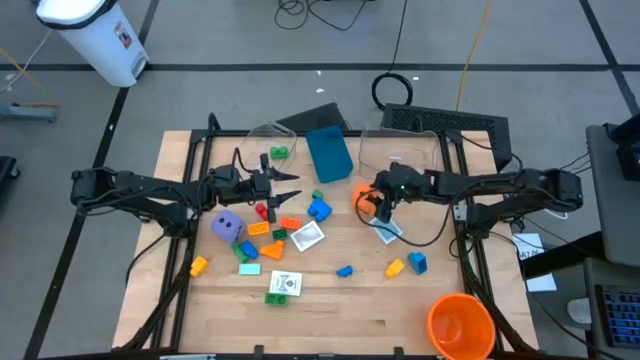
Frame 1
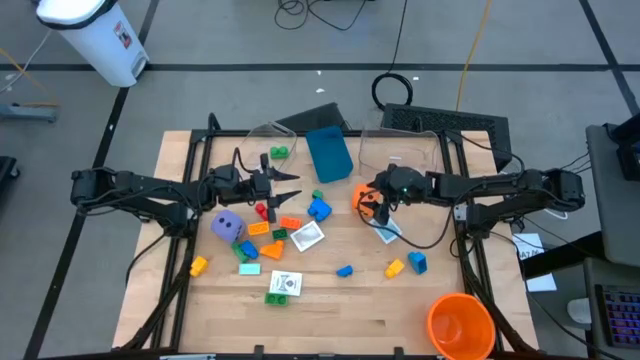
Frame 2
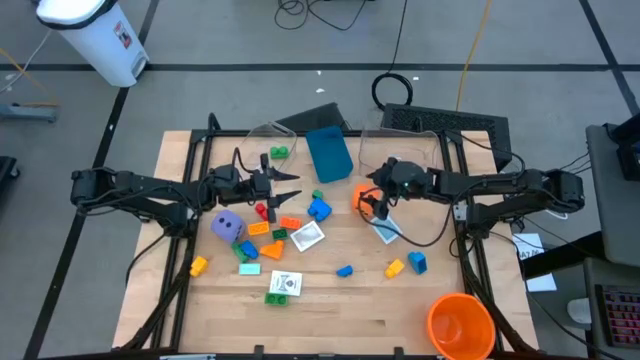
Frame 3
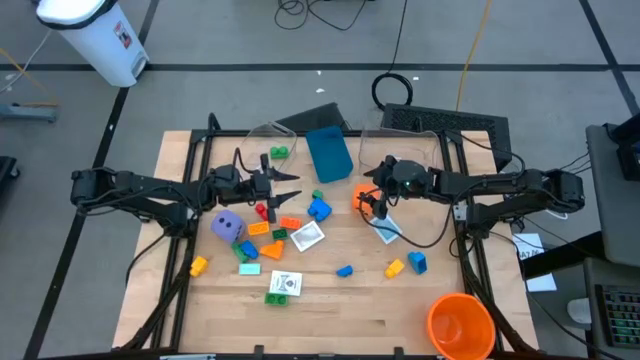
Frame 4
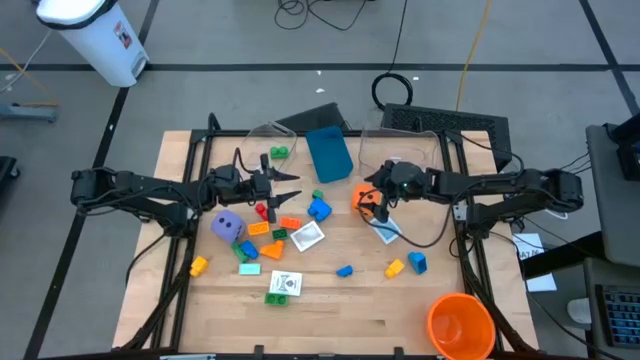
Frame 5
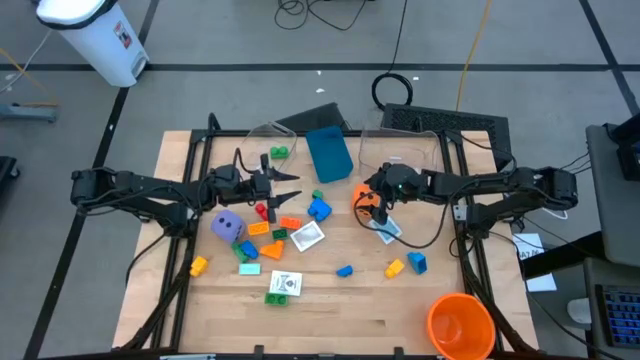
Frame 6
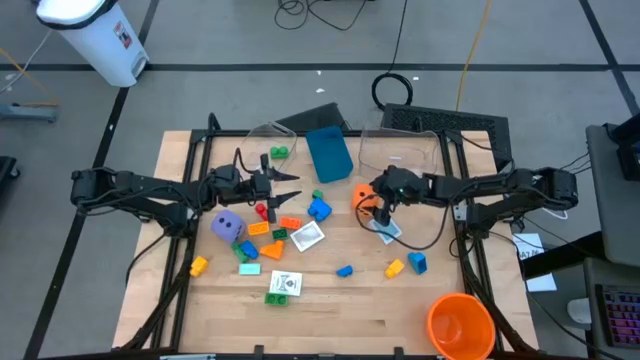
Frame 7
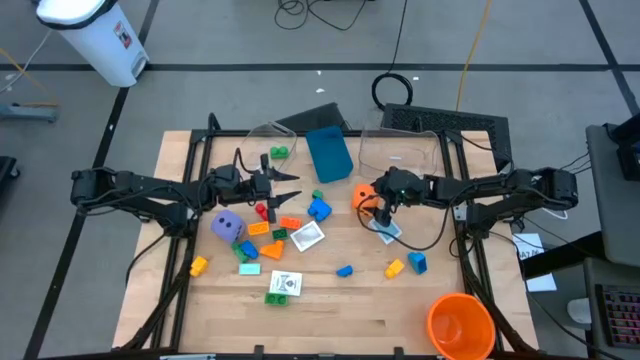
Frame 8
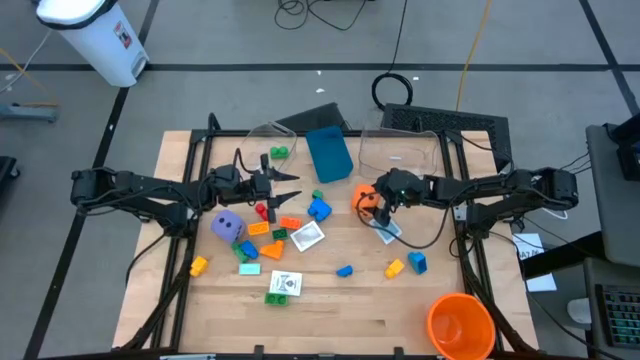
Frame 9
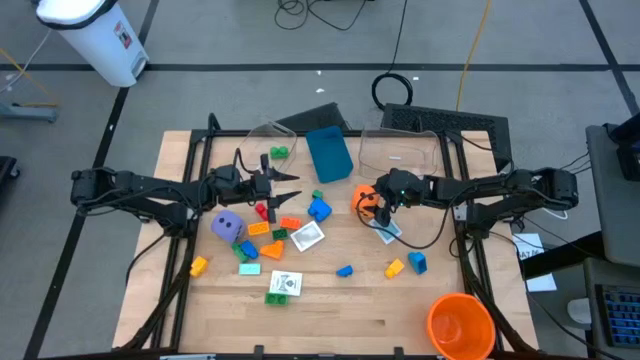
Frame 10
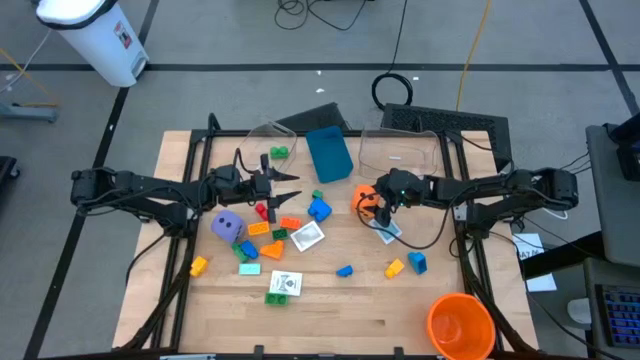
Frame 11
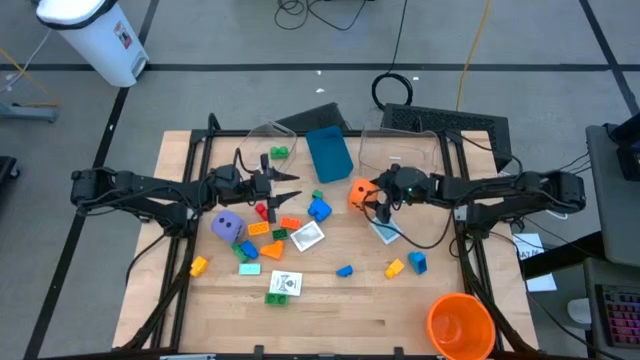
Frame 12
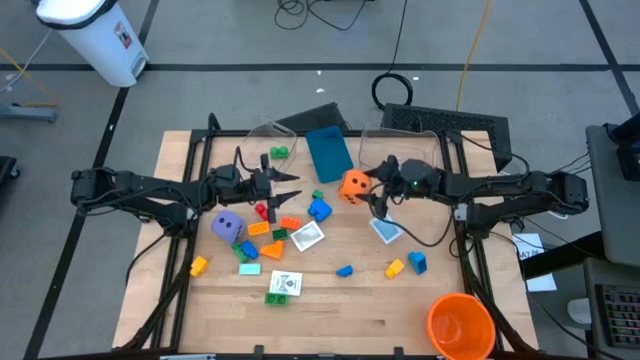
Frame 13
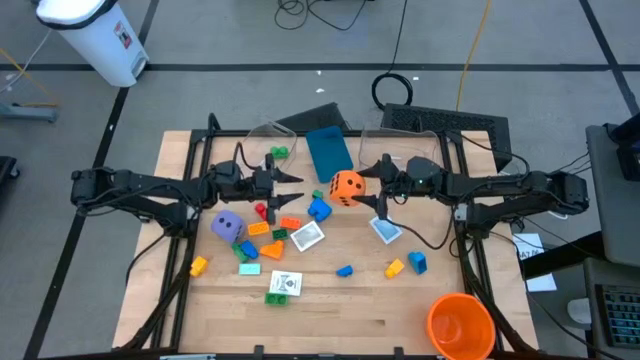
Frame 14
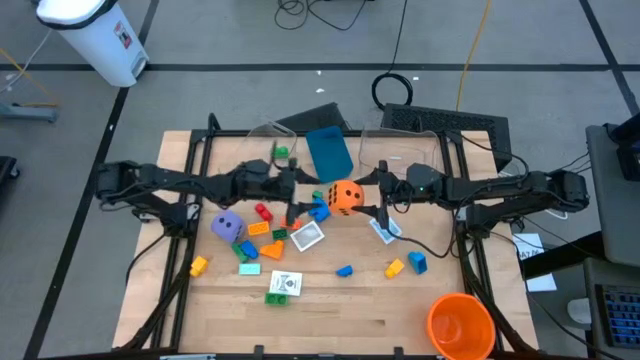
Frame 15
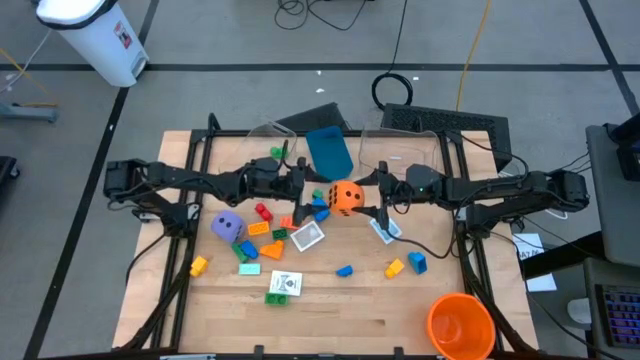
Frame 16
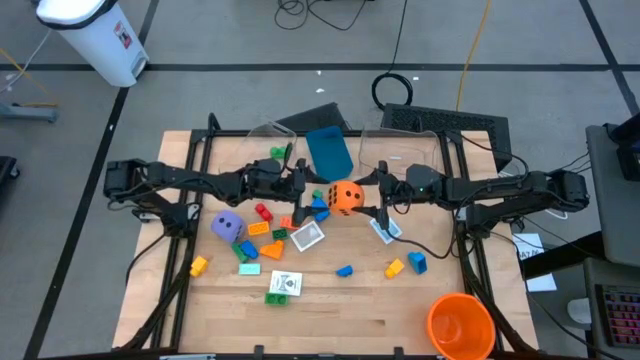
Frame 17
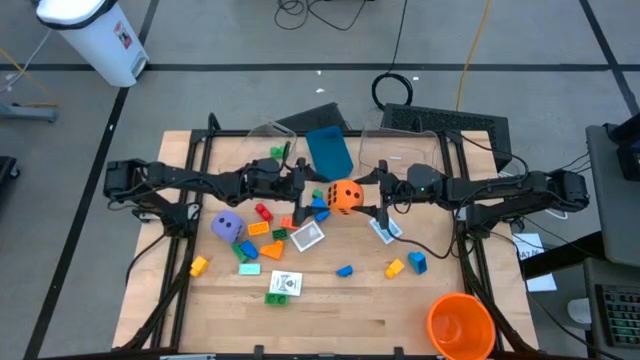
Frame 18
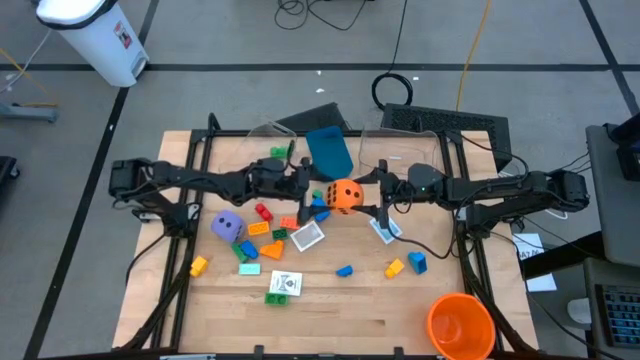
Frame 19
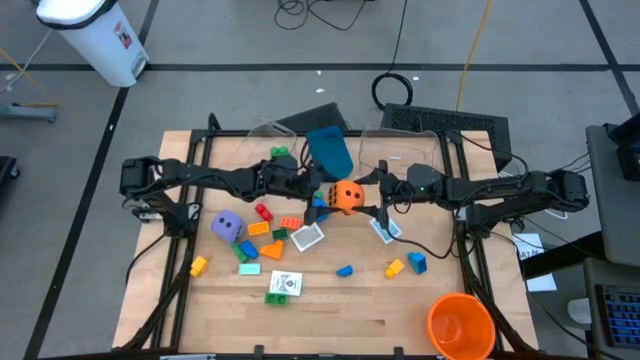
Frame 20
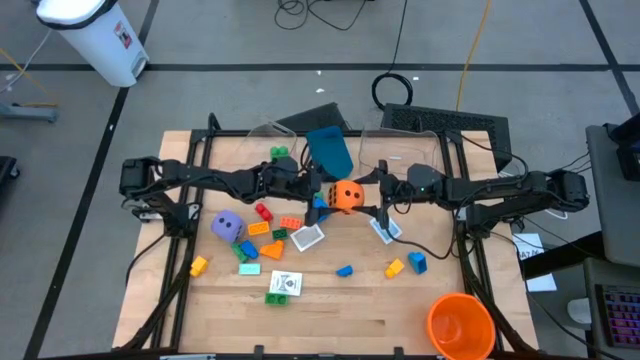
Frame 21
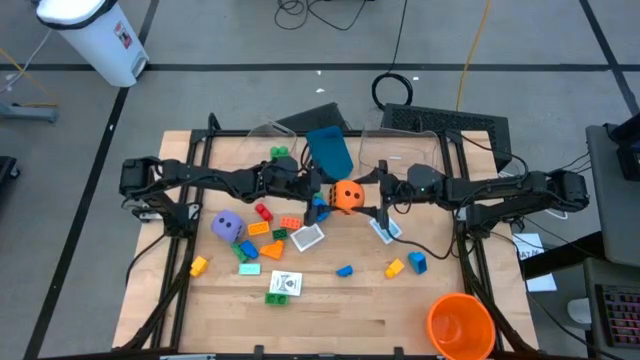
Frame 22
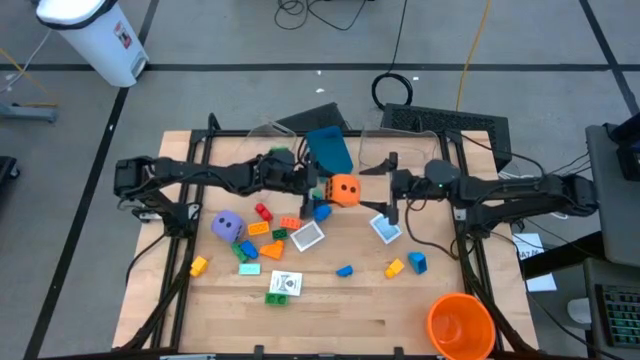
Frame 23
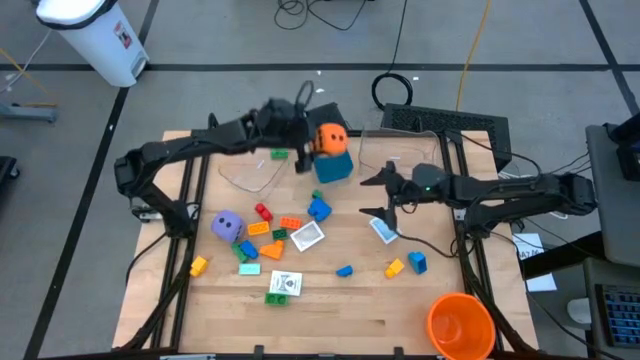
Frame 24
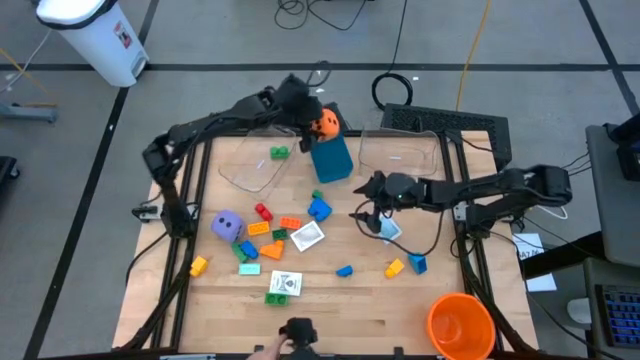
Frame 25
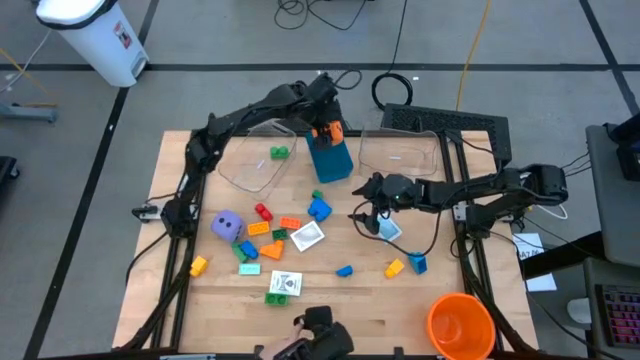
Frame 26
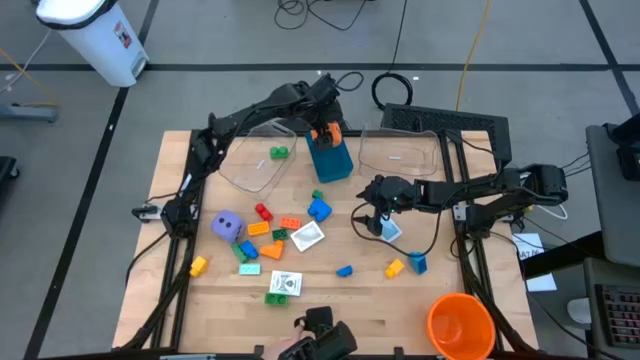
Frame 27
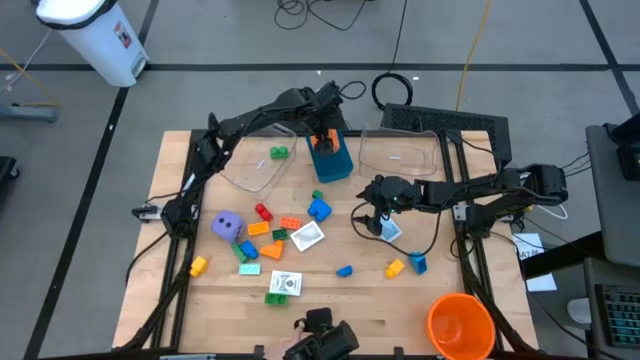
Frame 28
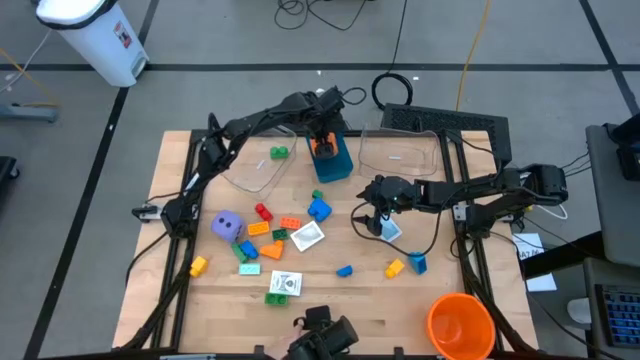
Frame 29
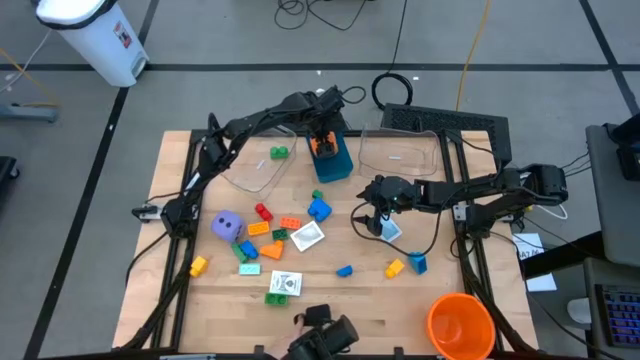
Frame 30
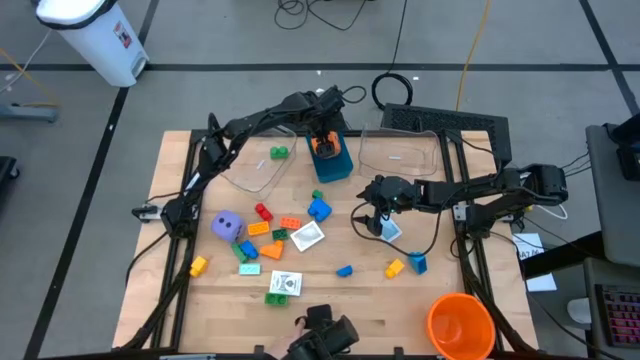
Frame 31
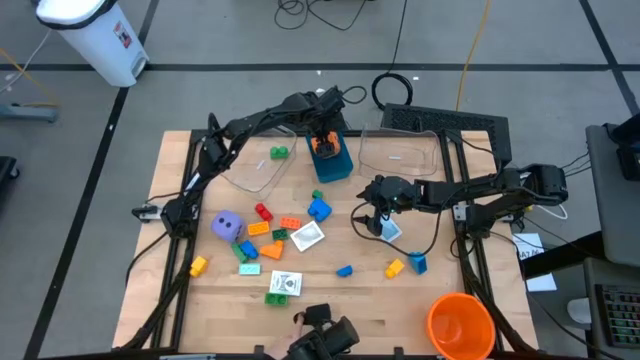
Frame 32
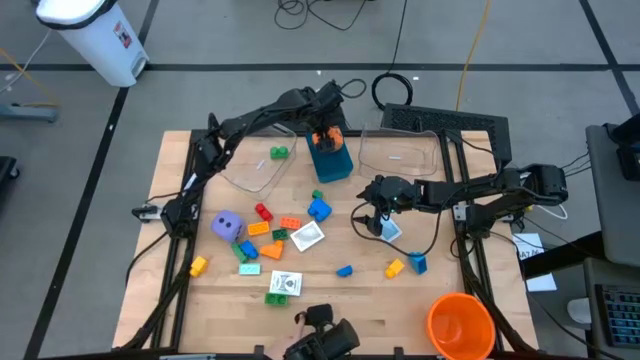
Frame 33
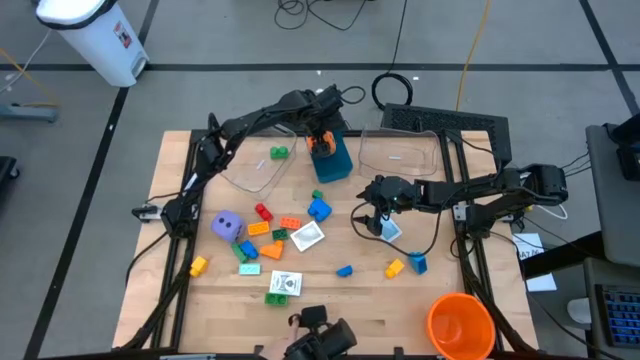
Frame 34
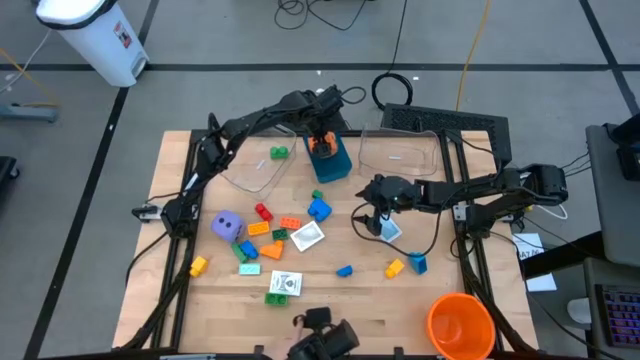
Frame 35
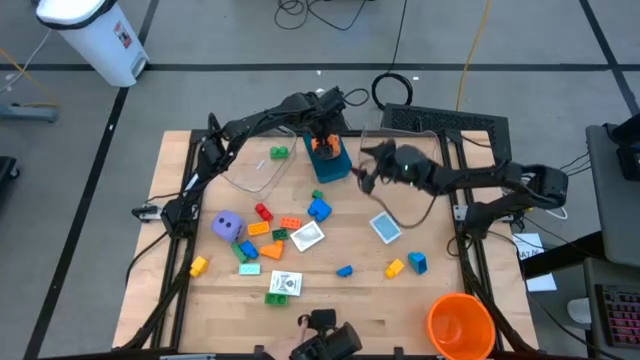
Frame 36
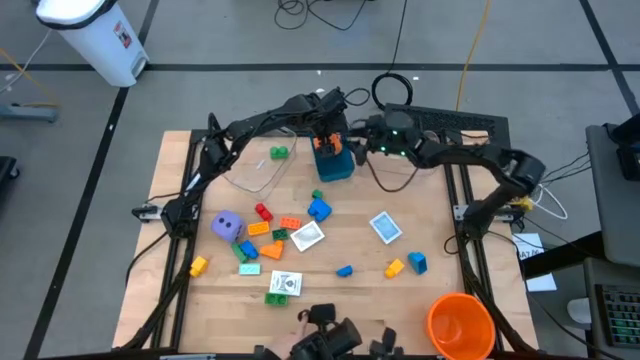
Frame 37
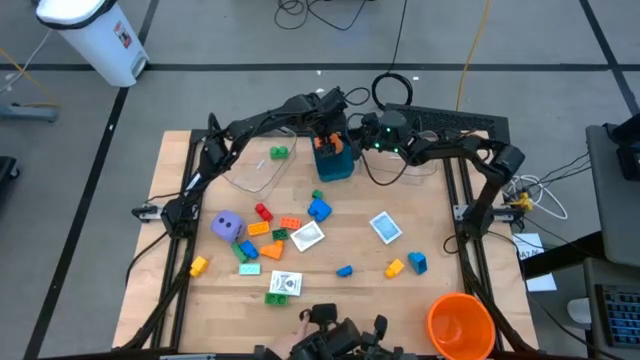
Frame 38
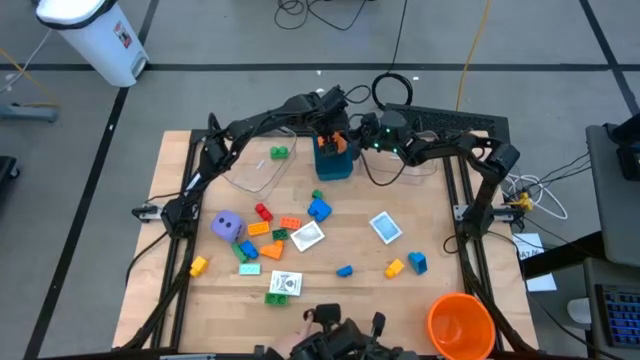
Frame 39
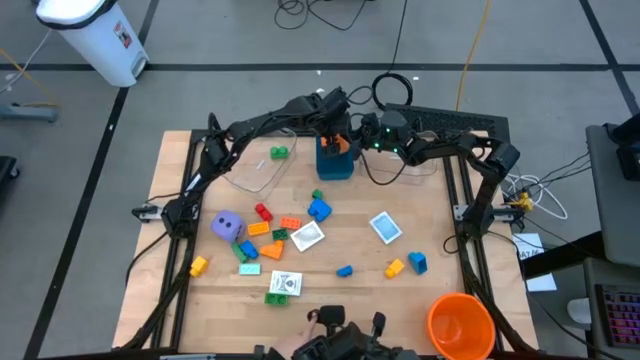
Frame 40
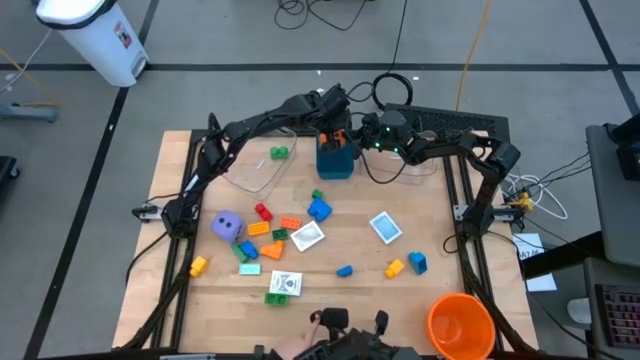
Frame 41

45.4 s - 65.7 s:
Task: Pick & Place Toys
Put the orange dice into the blue bin

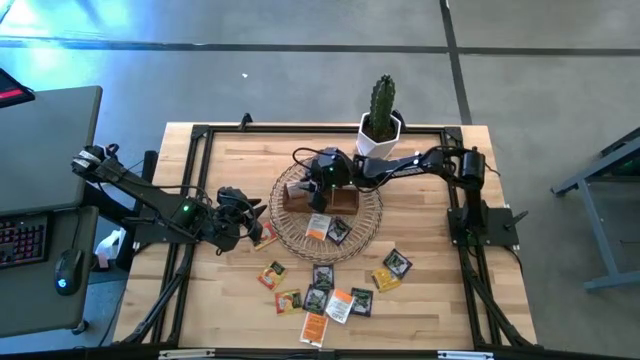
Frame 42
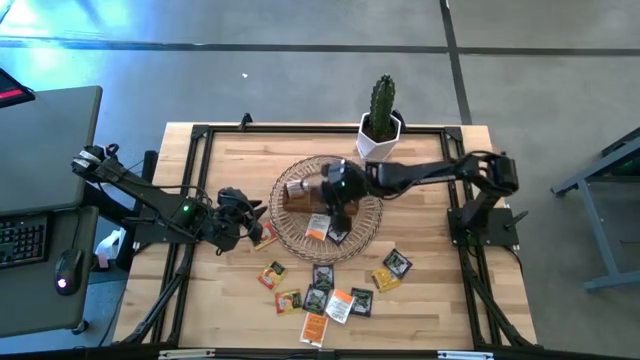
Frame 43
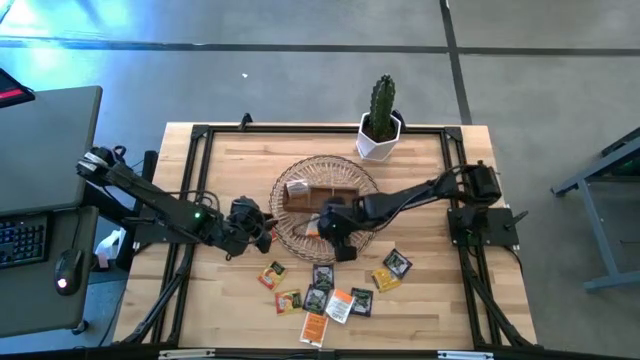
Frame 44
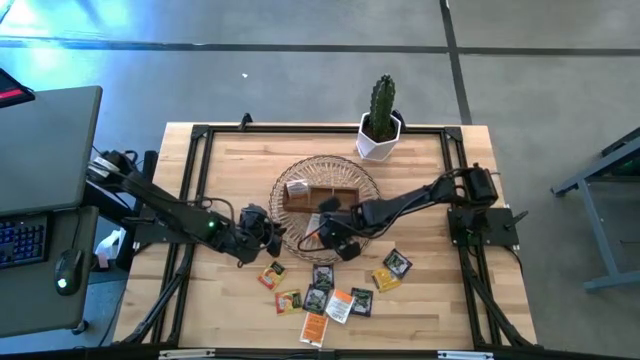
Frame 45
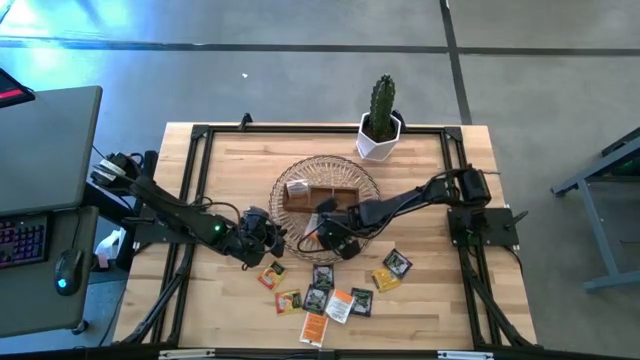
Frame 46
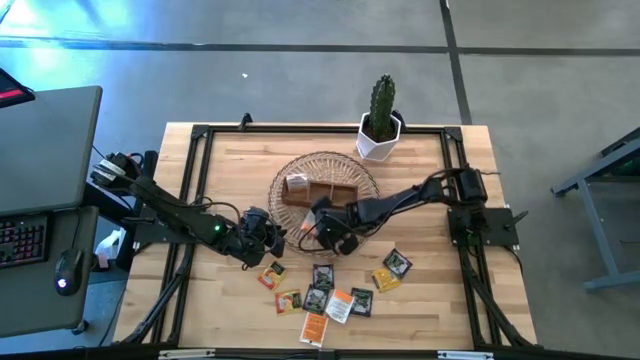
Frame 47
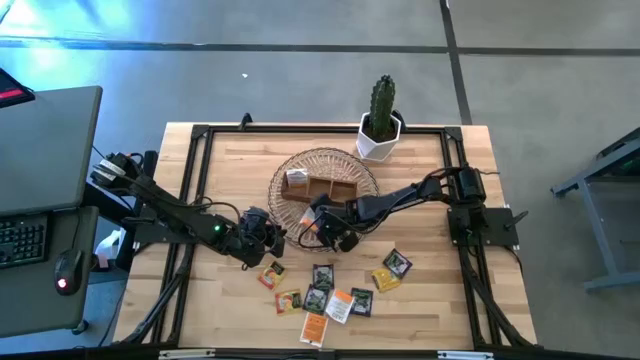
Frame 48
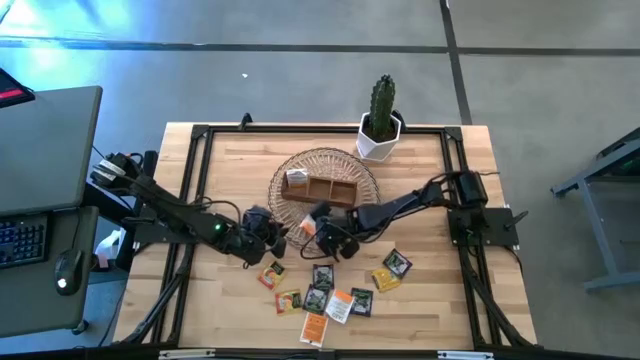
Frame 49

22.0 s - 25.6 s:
Task: Pick & Place Tea
Put the orange tea pack into the left section of the wooden organizer
